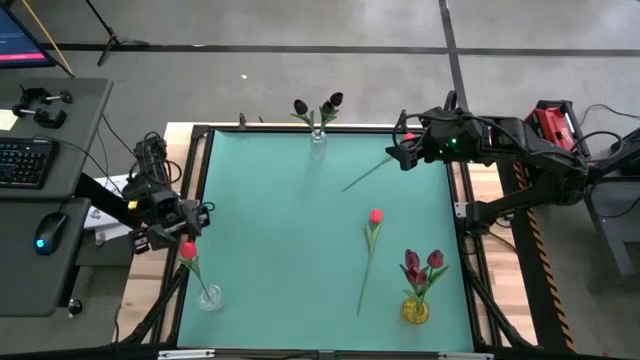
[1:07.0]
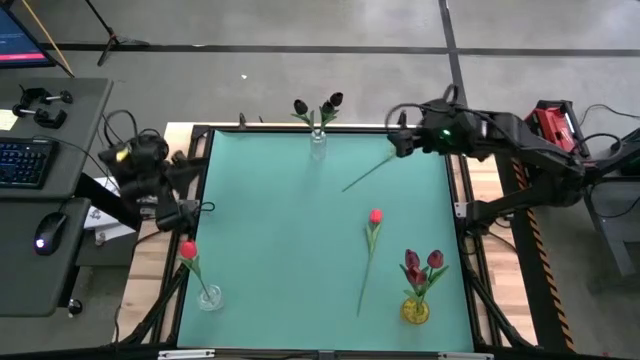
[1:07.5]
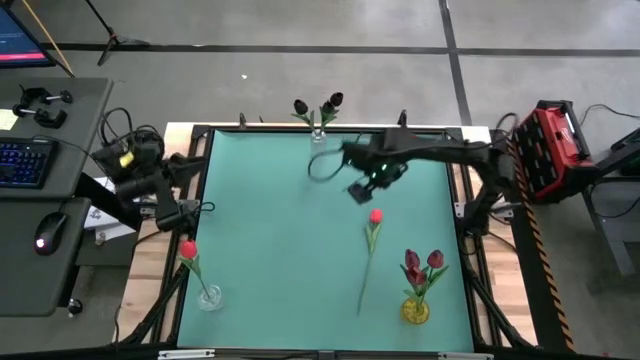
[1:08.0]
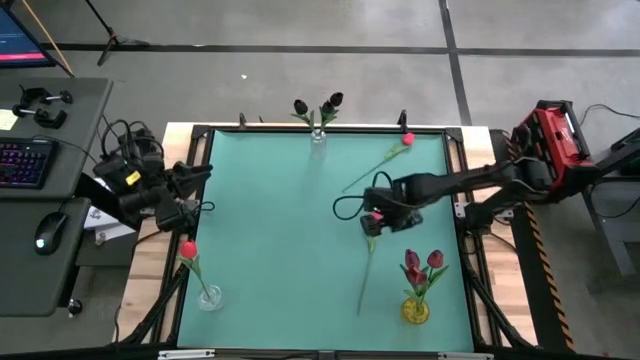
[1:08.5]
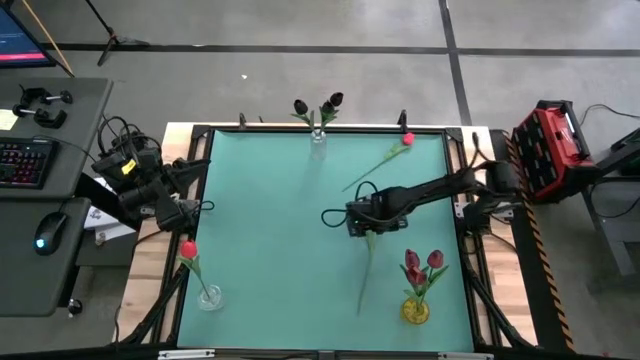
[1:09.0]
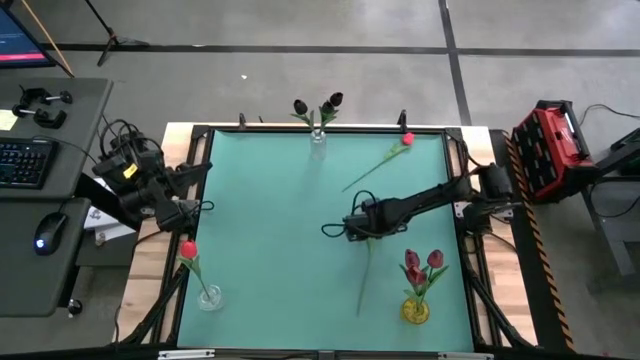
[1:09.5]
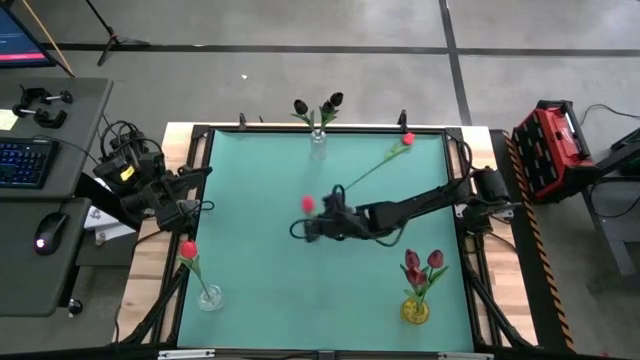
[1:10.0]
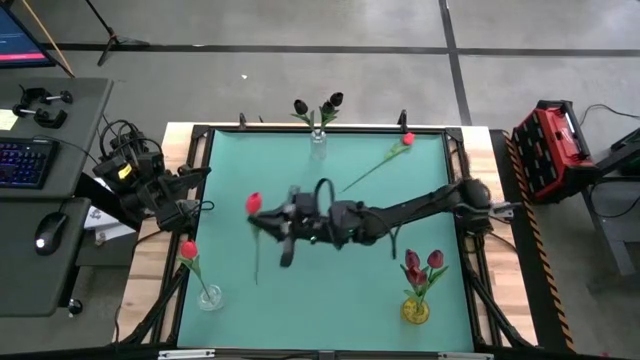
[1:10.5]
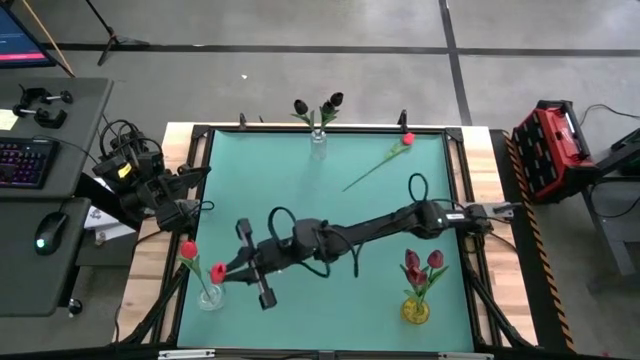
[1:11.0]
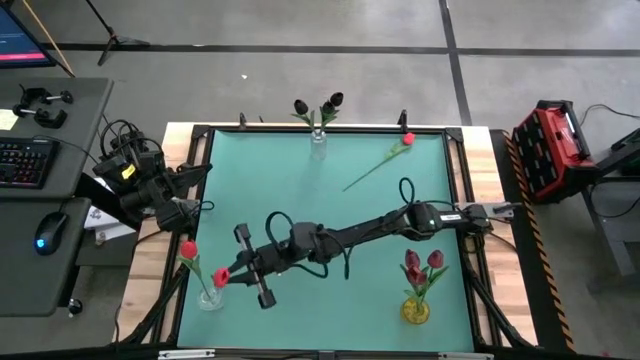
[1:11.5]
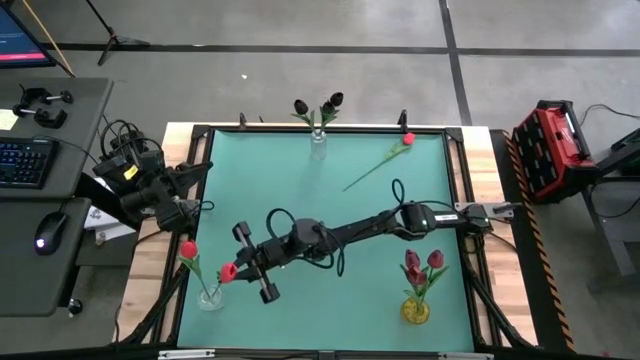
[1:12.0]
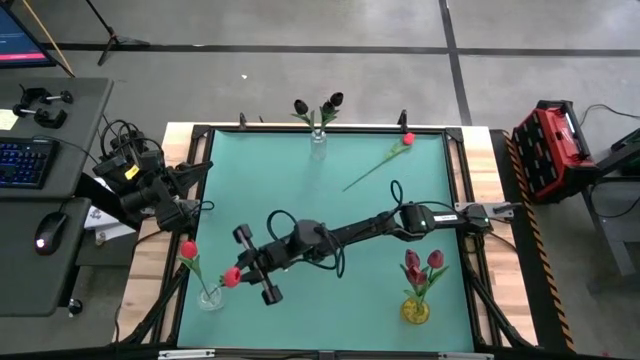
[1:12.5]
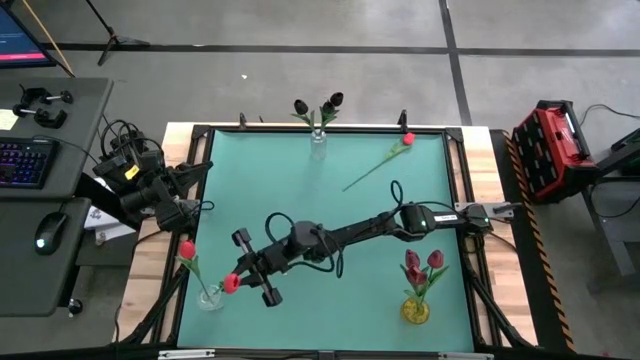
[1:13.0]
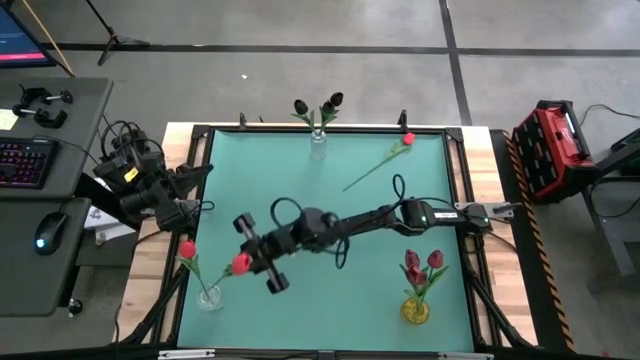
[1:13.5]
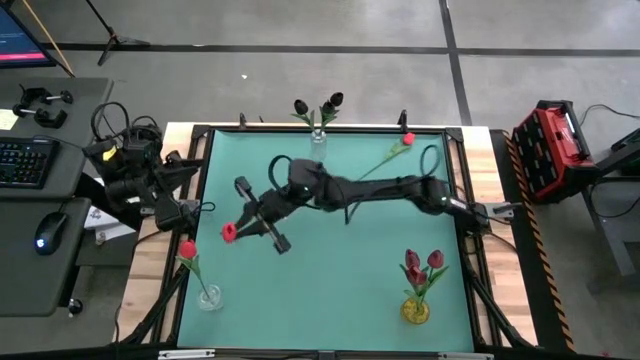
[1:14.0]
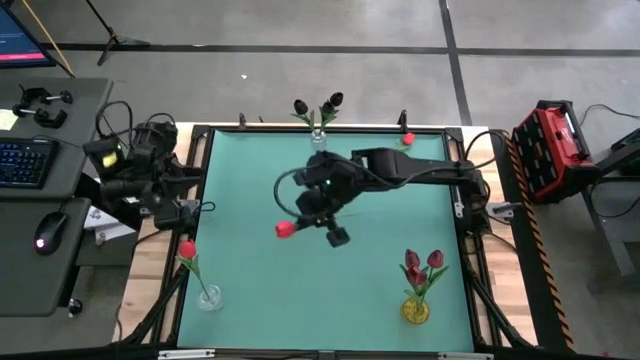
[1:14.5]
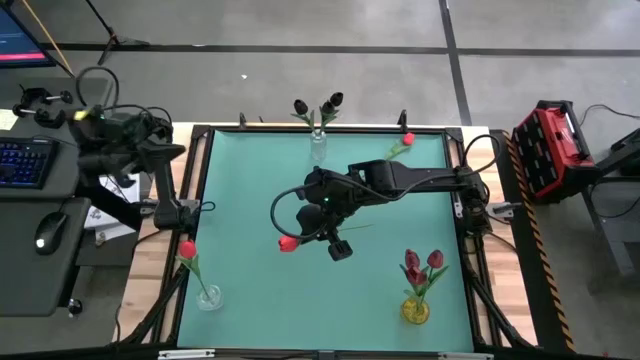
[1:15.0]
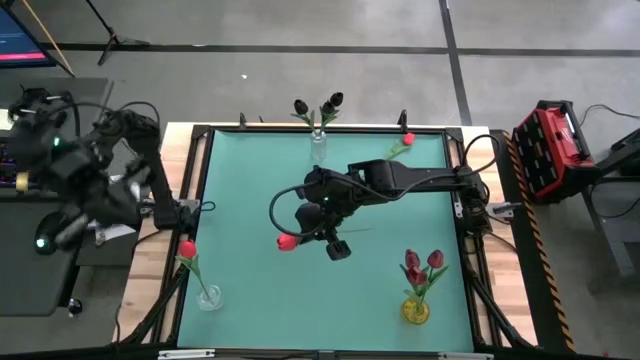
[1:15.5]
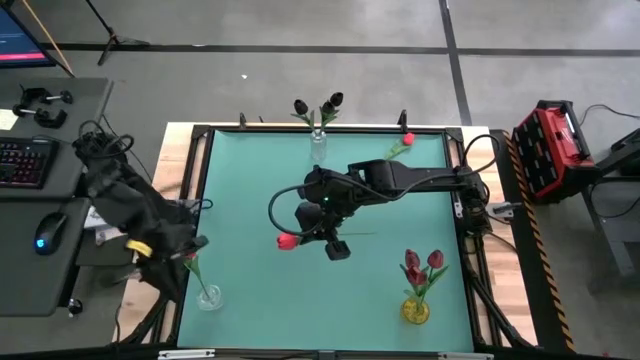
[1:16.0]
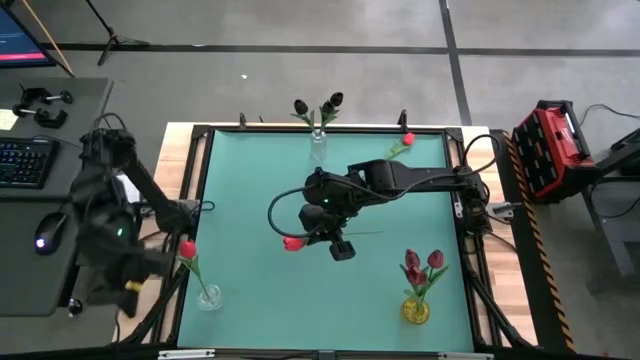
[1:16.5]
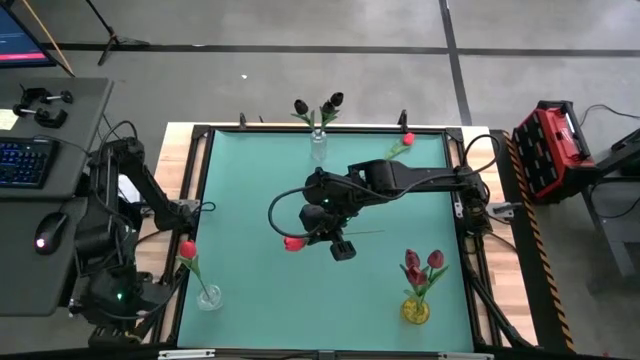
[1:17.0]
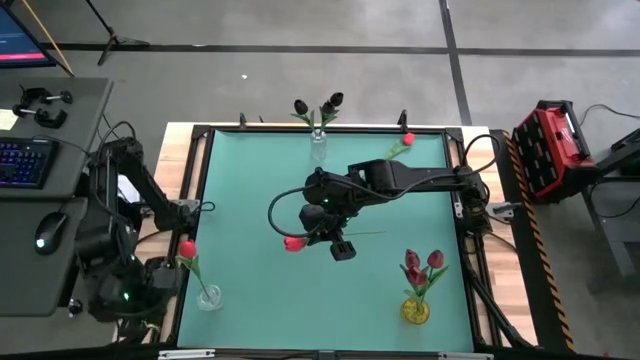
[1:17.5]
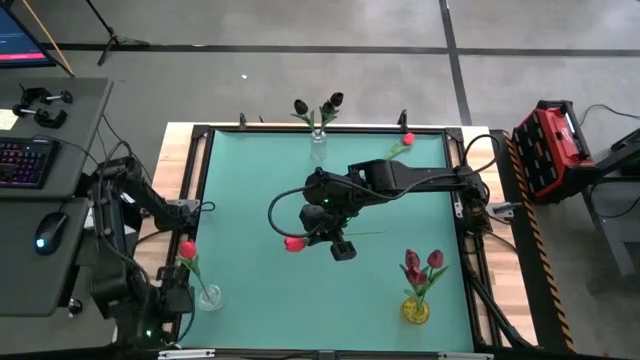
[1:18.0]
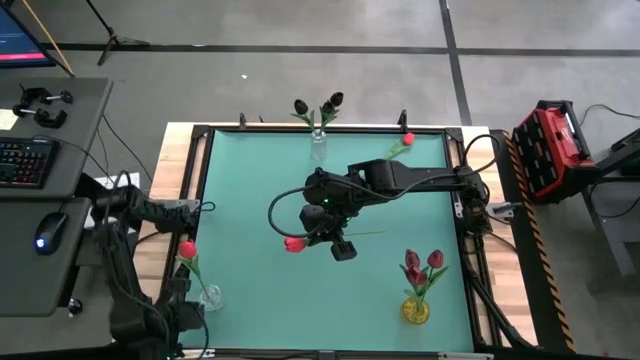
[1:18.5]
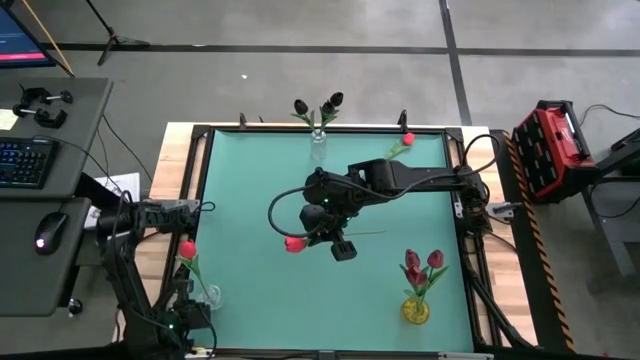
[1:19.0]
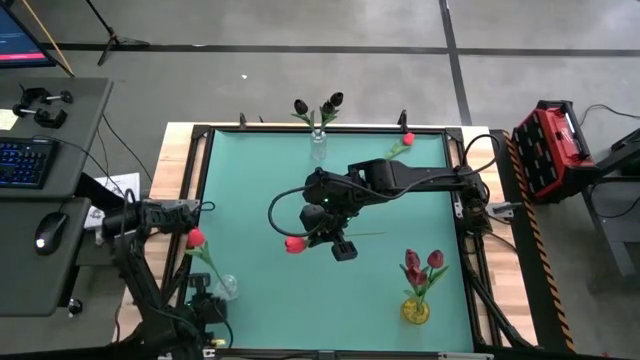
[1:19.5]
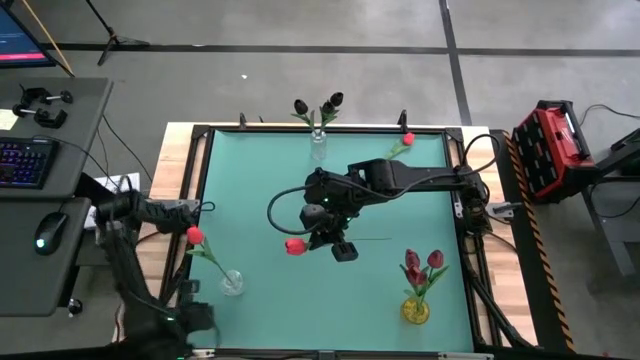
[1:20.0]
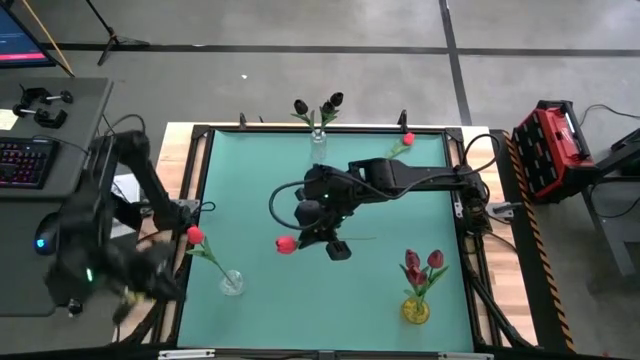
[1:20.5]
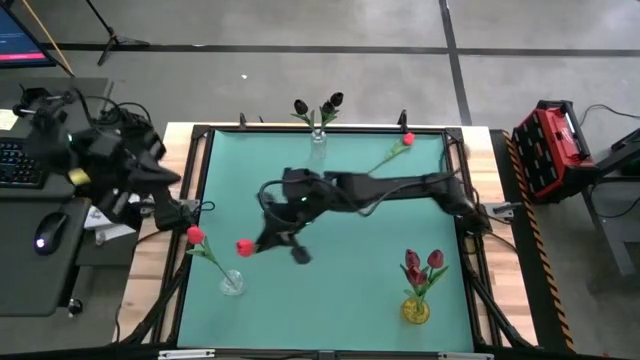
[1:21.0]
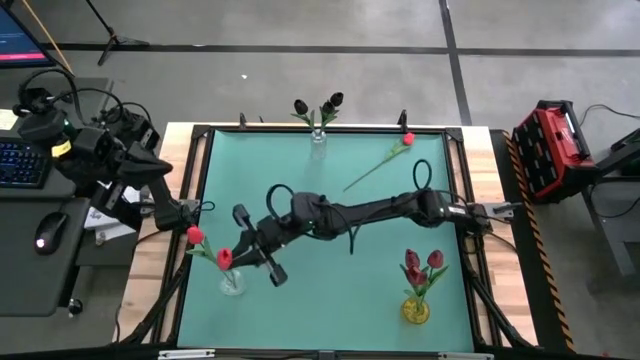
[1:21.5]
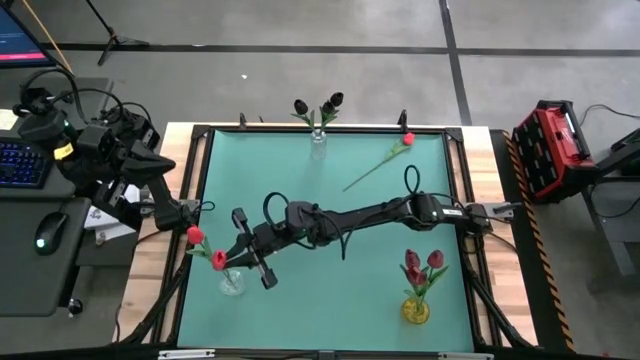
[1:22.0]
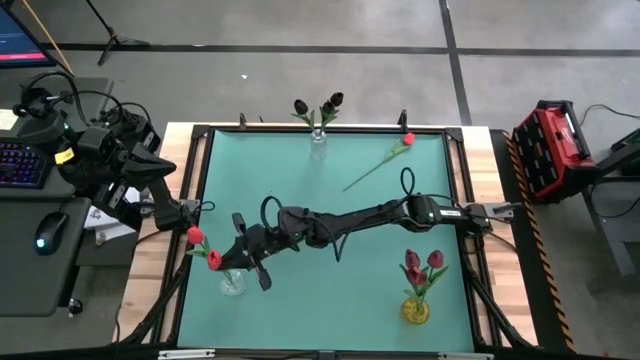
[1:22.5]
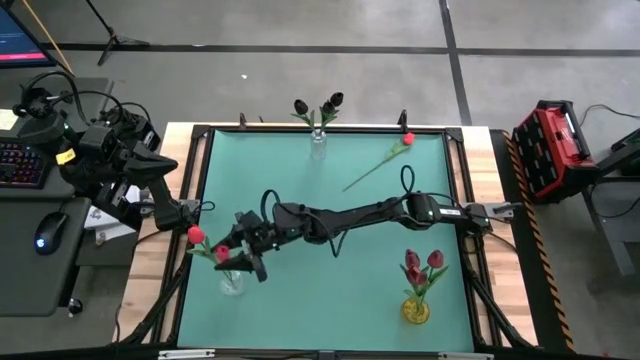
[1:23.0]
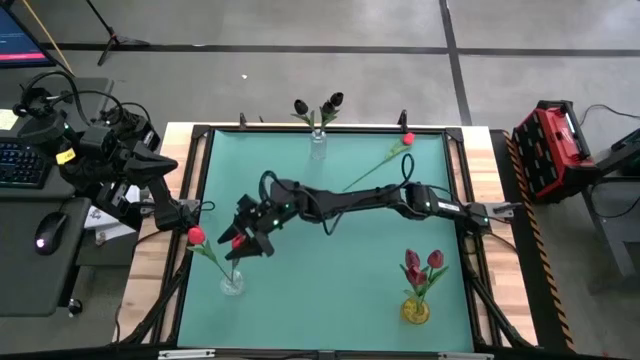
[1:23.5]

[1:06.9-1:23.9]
Task: Sort flowers into vase by color
Put the bottom red tulip into the bottom transparent vase

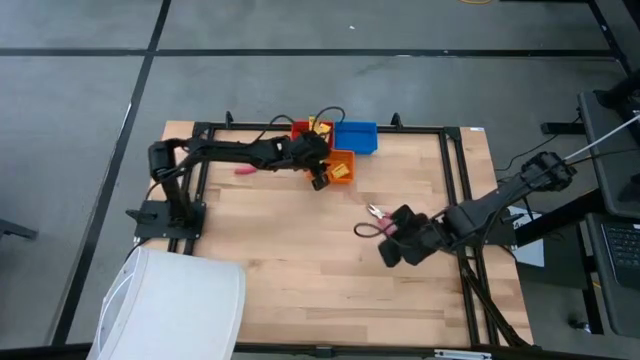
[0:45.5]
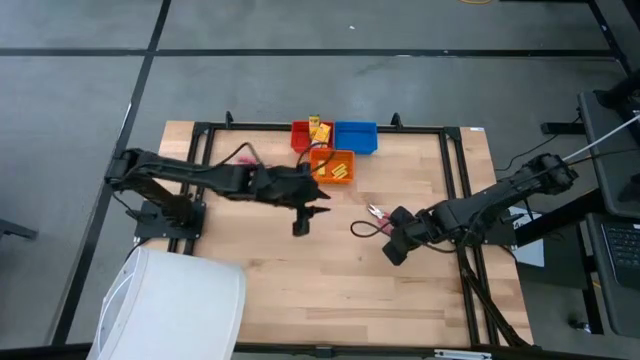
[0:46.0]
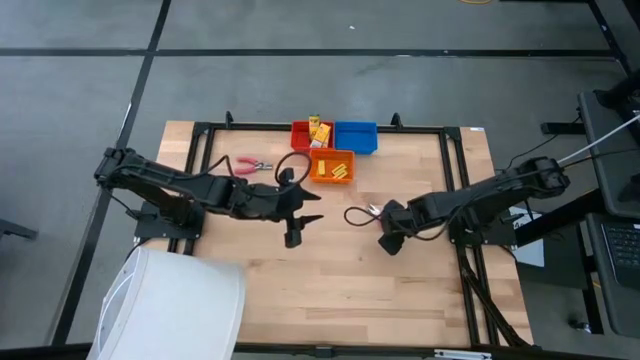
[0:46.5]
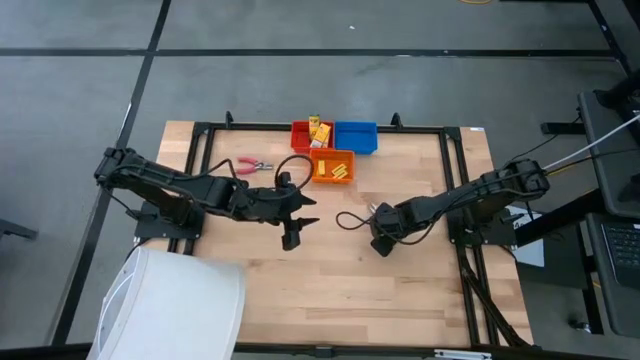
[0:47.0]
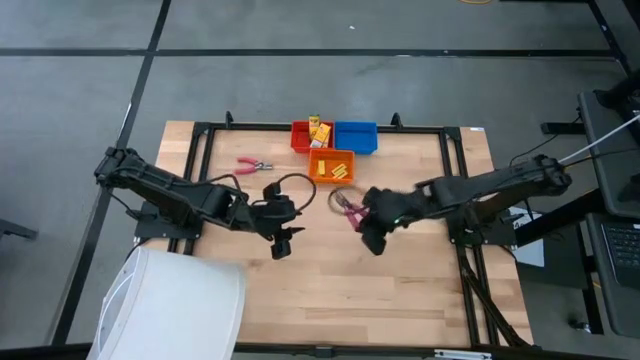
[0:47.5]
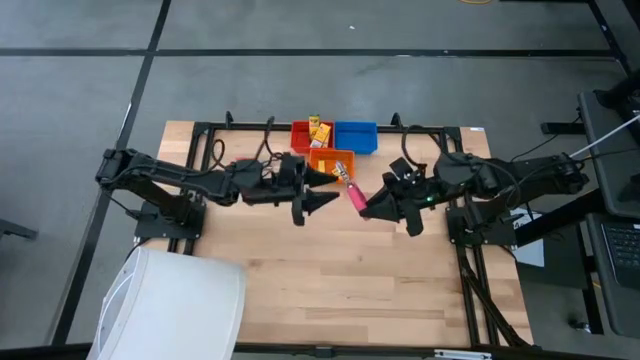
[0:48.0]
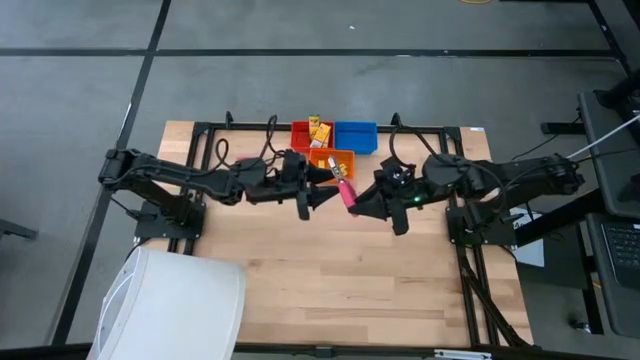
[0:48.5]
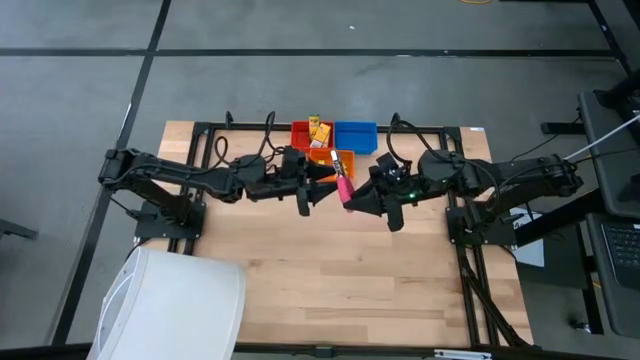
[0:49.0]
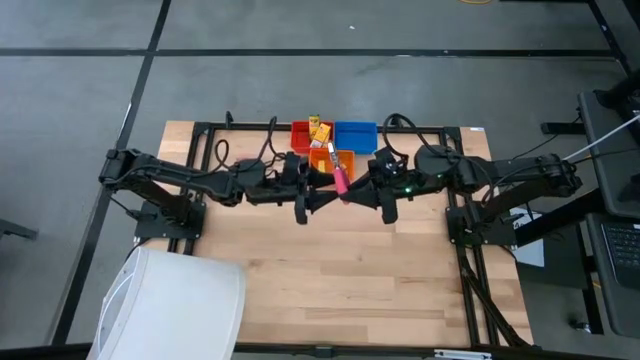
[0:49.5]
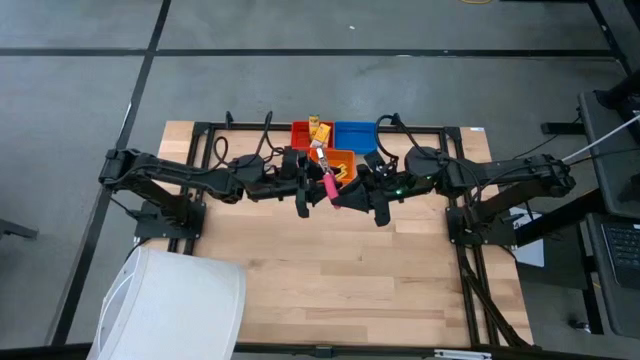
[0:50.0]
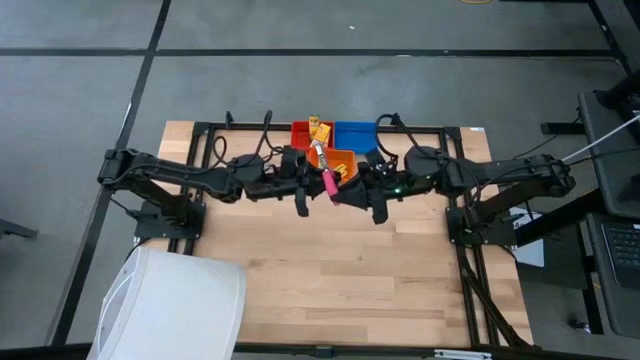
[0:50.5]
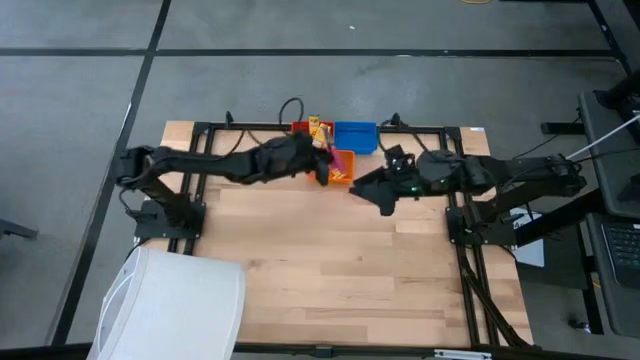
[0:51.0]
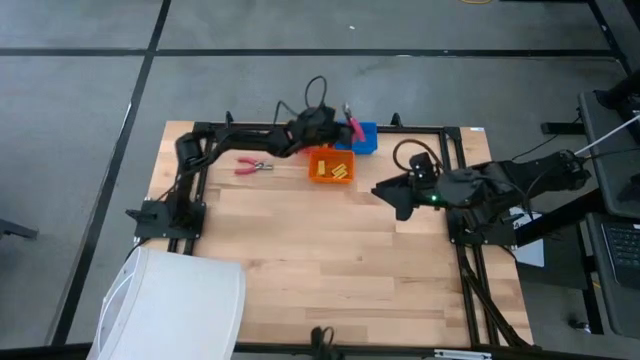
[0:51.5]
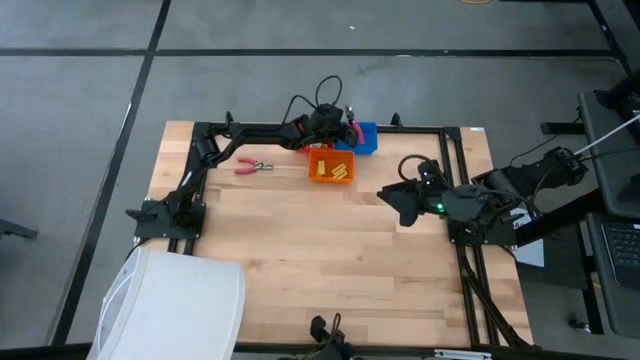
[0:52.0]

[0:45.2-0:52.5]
Task: Pick & Place School Supplies
Put the pink hole punchers into the blue bin
